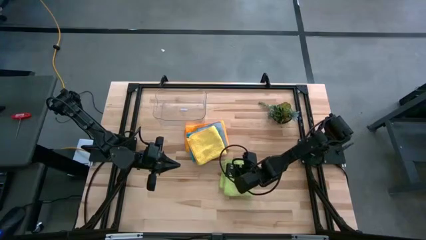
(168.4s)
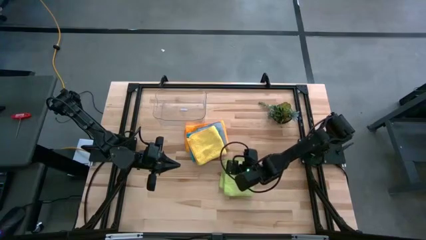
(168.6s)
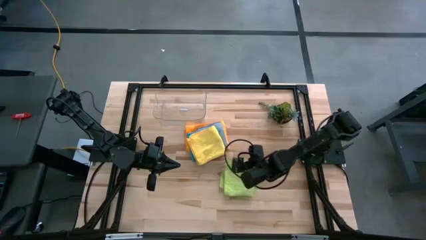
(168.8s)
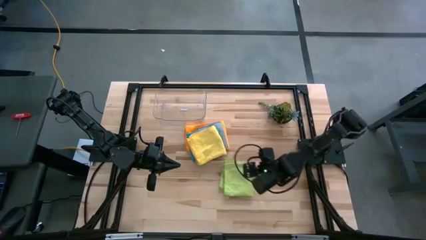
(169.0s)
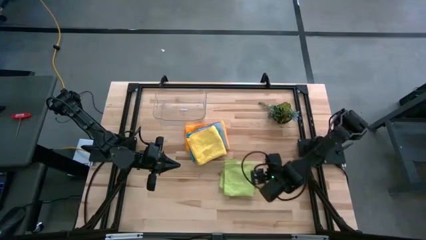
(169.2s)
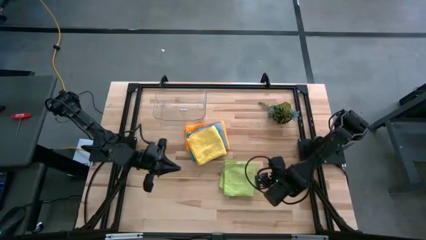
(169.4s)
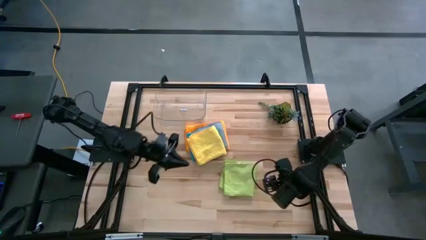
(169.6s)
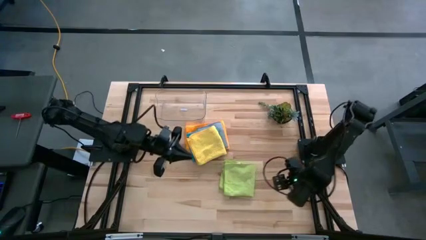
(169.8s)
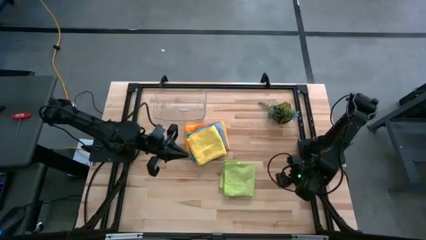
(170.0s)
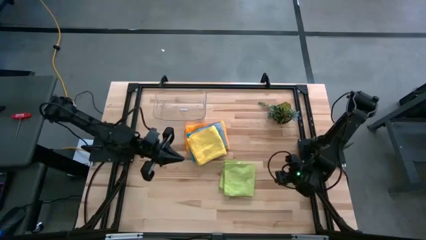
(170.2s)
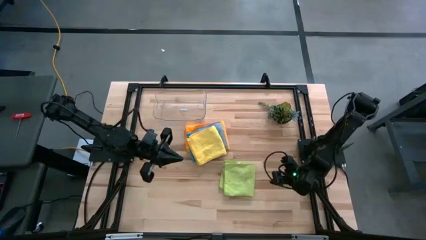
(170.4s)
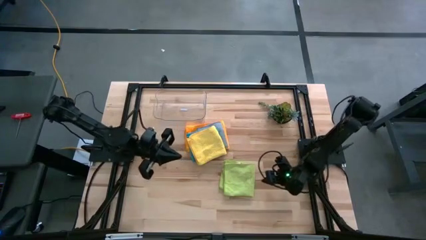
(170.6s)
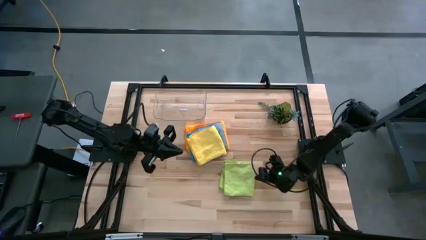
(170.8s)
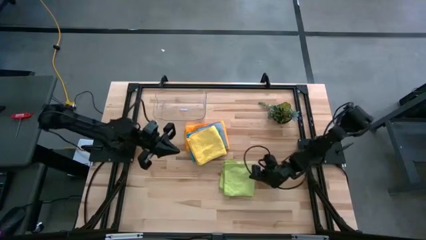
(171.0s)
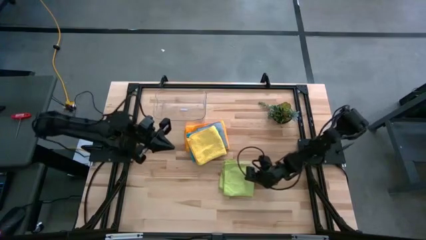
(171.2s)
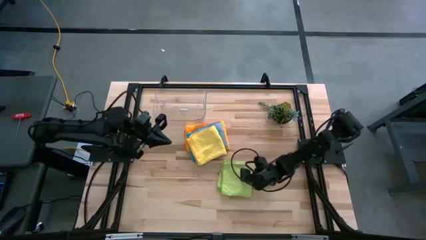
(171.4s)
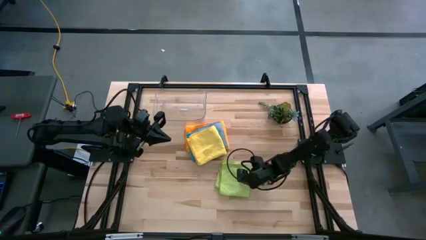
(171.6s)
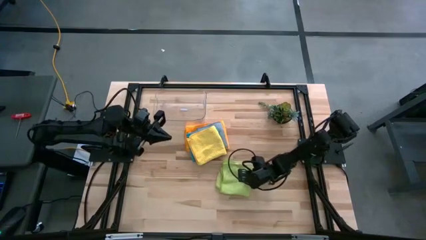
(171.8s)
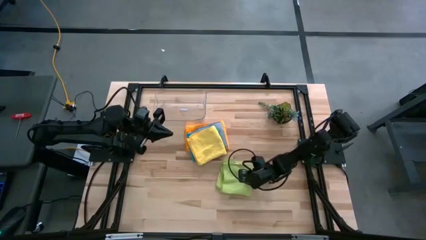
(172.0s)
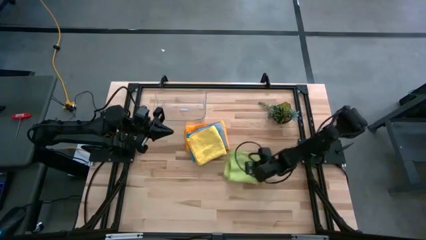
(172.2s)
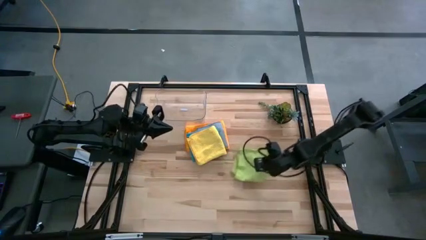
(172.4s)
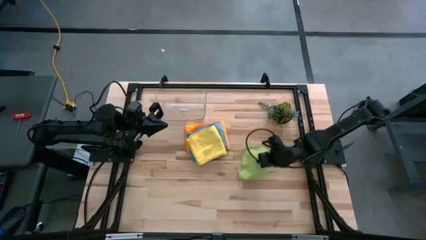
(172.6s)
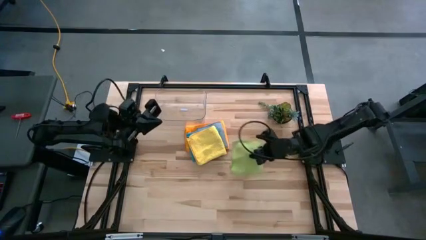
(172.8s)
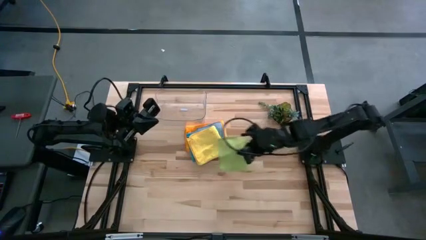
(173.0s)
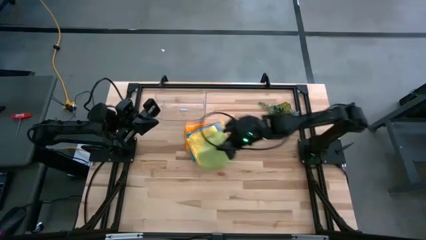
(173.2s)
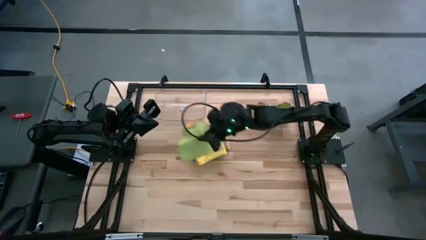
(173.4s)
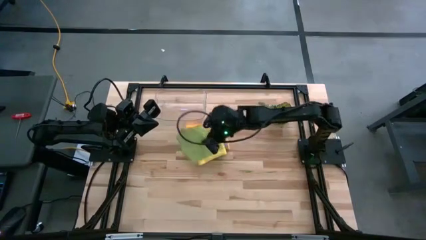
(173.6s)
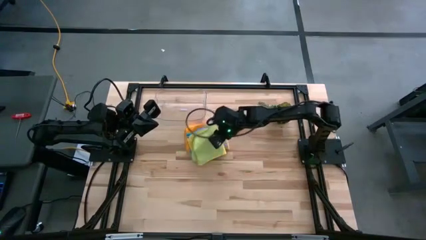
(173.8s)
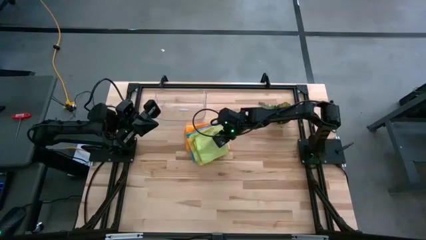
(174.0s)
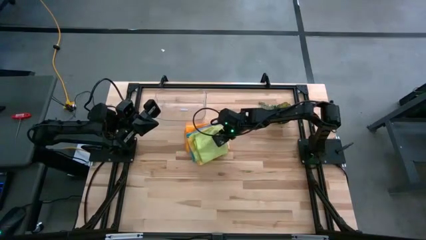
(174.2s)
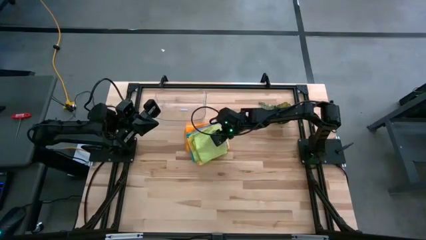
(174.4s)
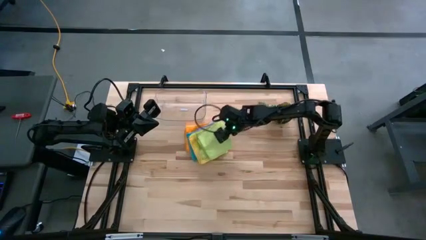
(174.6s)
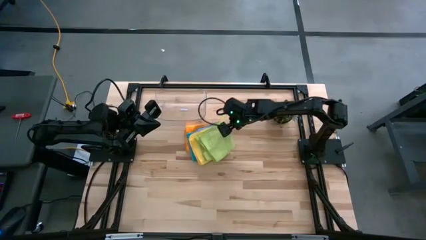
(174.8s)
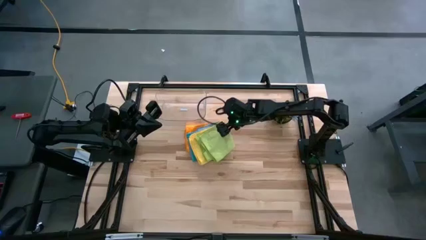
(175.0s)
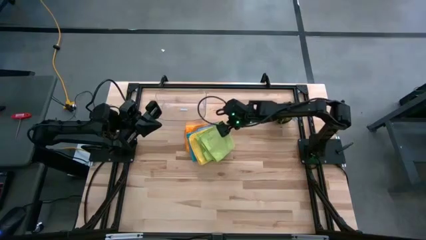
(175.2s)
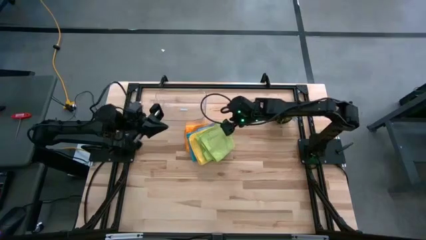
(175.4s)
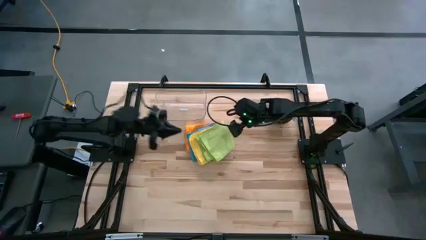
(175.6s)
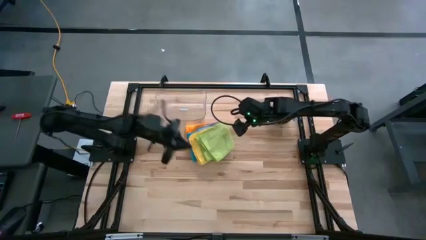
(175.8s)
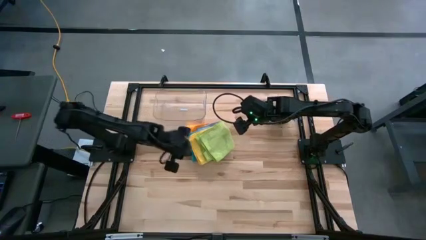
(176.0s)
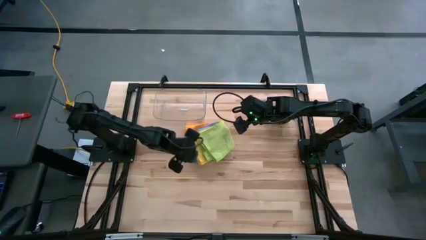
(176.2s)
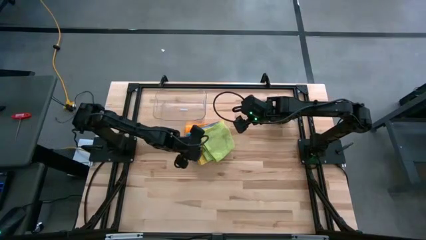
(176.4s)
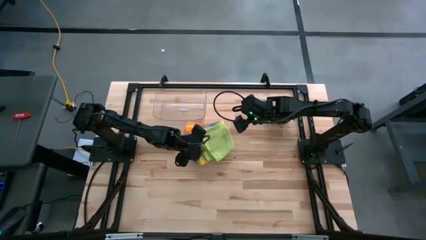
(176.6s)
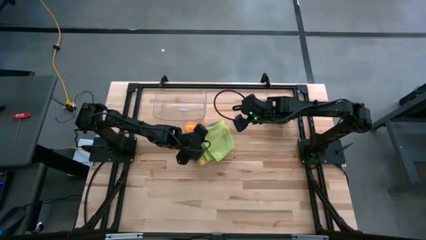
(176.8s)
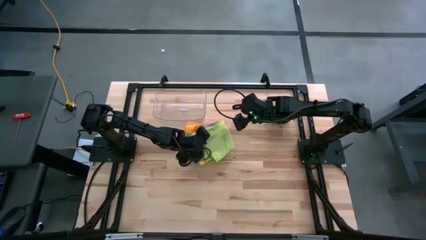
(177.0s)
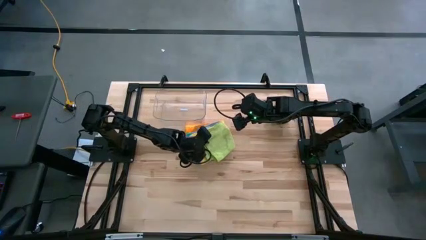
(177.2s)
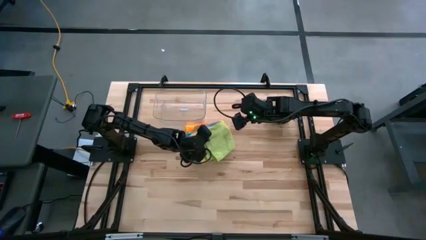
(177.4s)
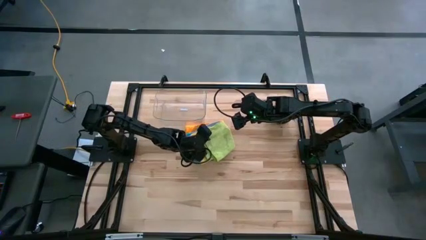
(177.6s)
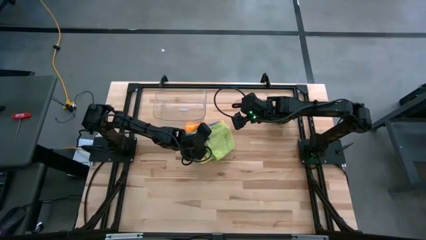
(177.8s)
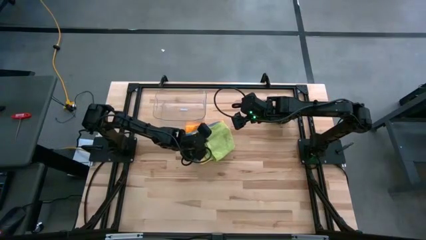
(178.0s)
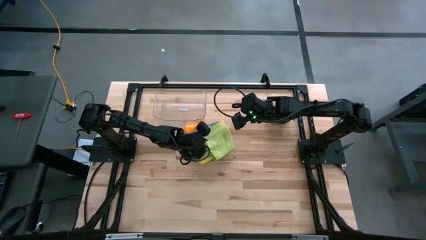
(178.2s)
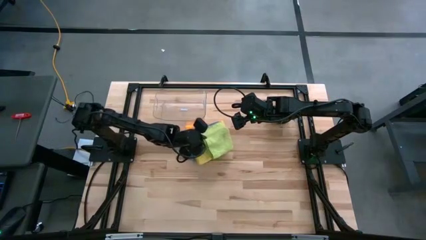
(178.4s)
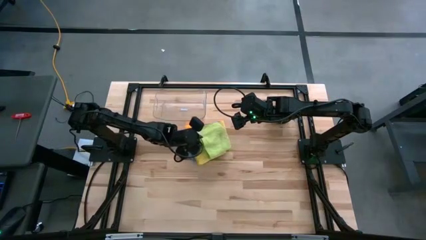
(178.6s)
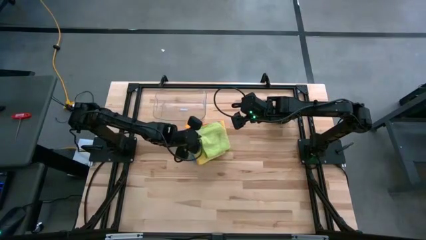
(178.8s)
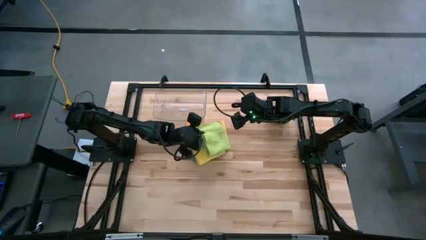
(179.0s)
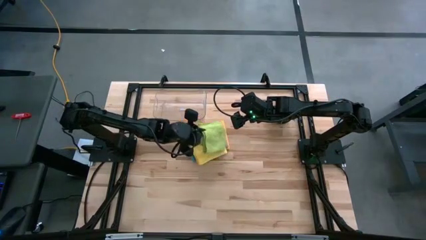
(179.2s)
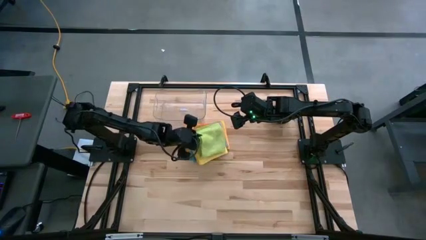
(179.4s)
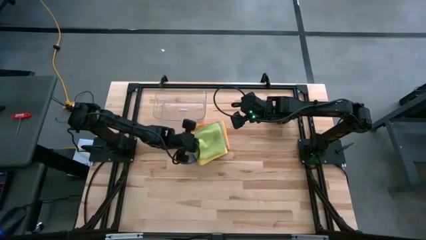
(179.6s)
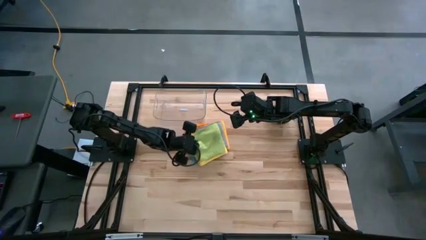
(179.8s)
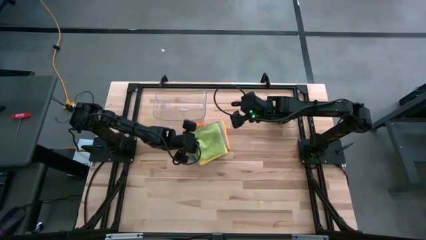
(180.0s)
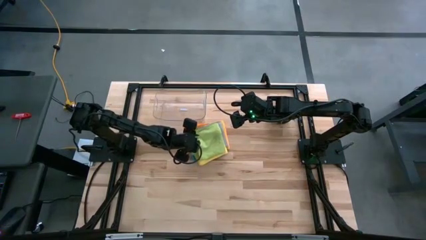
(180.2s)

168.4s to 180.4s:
Task: Fold microfiber towels
Stack the green towel on the yellow towel
